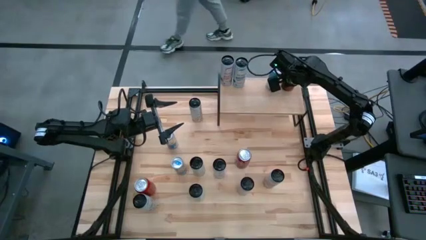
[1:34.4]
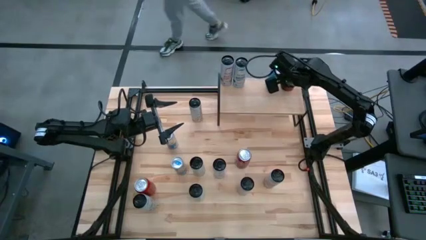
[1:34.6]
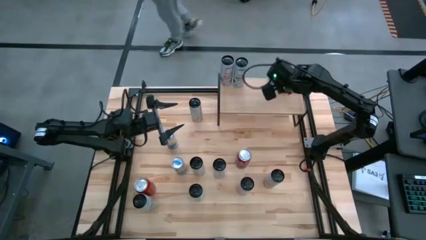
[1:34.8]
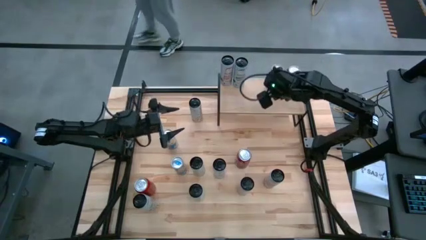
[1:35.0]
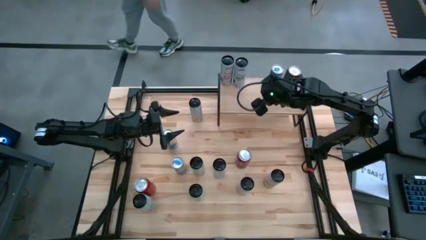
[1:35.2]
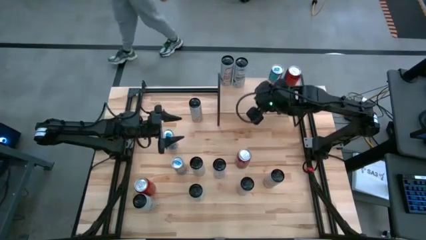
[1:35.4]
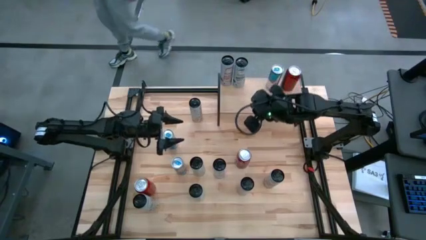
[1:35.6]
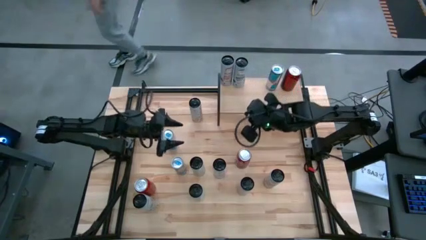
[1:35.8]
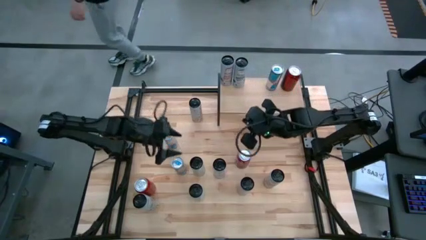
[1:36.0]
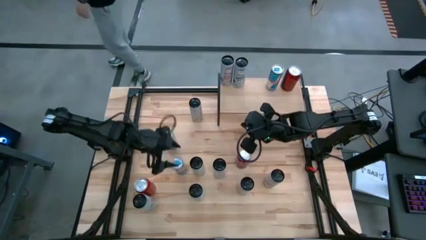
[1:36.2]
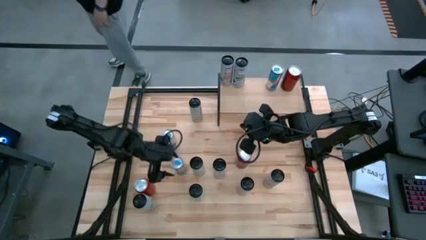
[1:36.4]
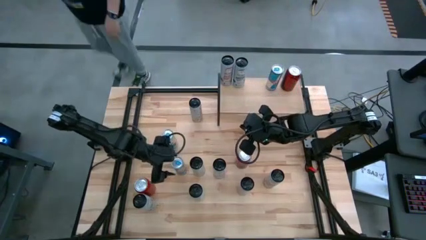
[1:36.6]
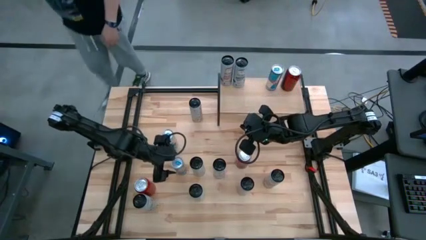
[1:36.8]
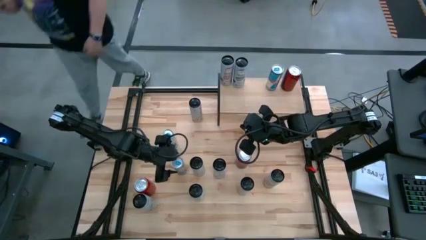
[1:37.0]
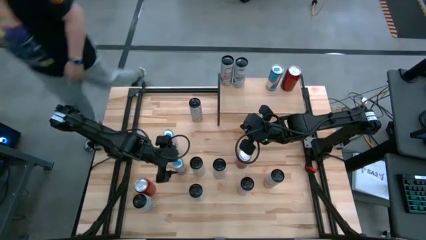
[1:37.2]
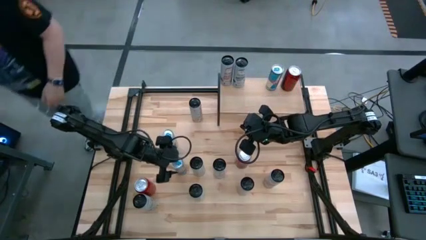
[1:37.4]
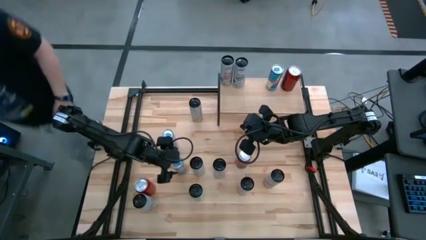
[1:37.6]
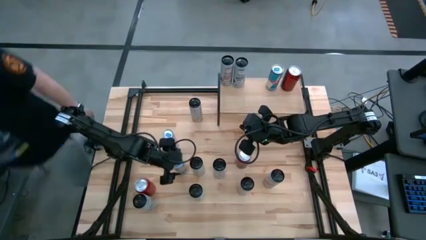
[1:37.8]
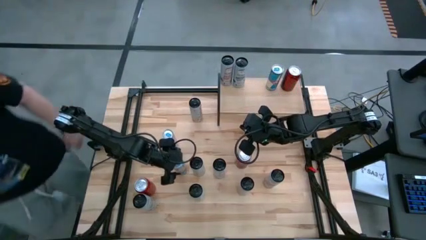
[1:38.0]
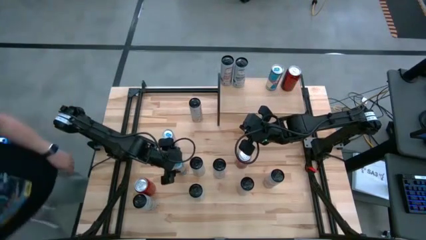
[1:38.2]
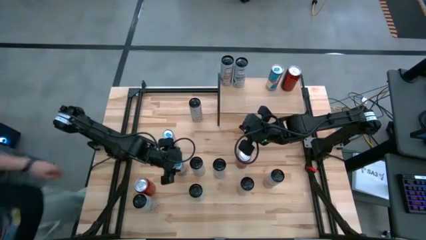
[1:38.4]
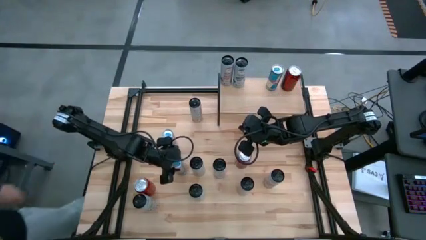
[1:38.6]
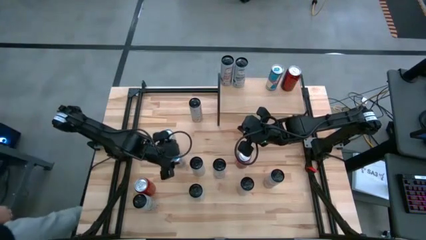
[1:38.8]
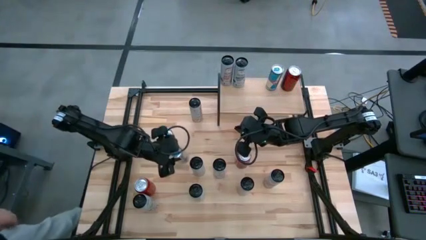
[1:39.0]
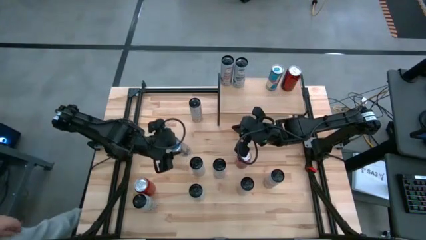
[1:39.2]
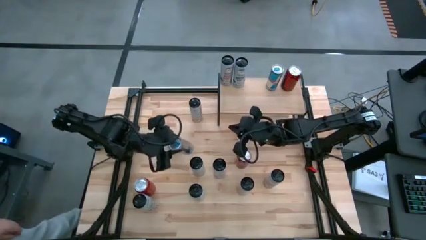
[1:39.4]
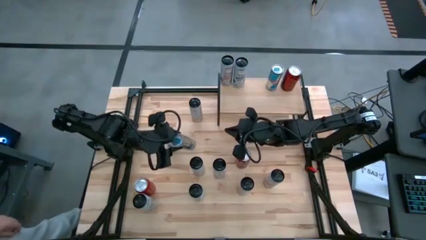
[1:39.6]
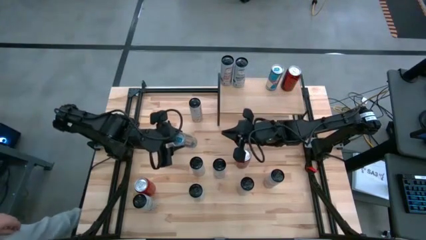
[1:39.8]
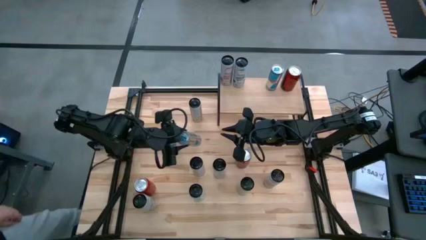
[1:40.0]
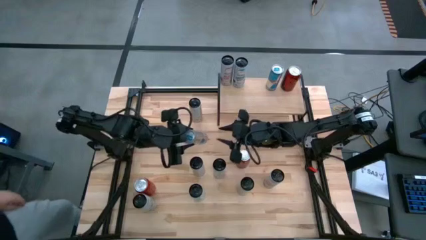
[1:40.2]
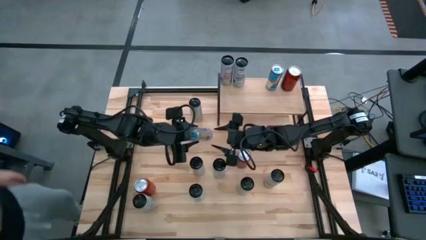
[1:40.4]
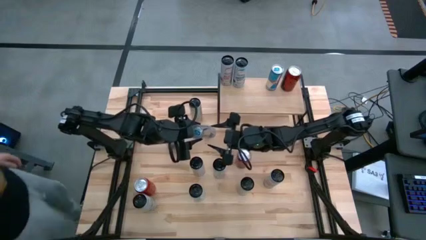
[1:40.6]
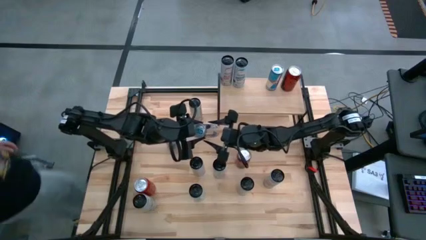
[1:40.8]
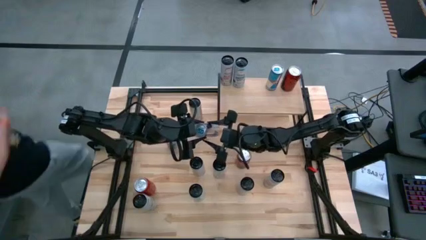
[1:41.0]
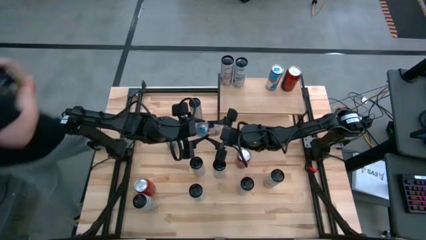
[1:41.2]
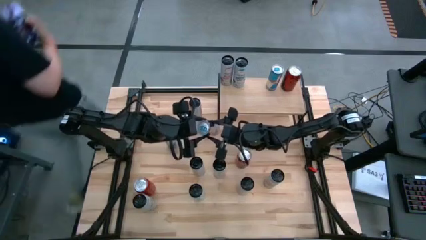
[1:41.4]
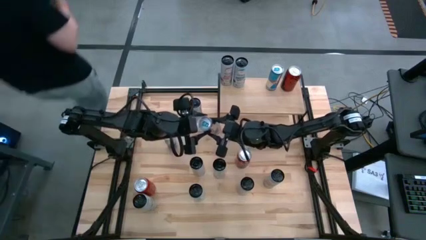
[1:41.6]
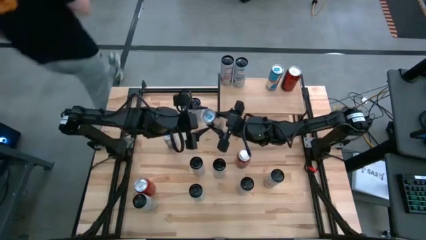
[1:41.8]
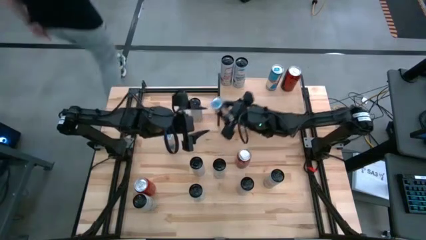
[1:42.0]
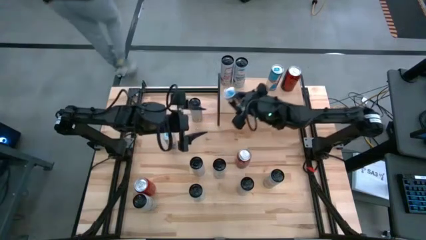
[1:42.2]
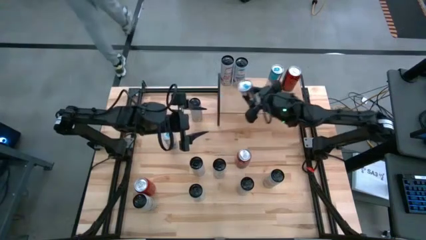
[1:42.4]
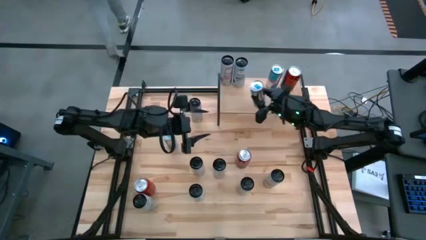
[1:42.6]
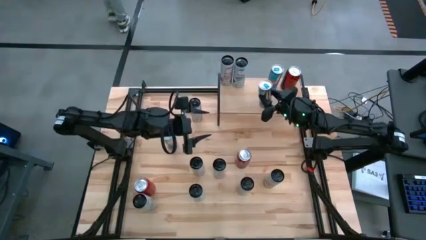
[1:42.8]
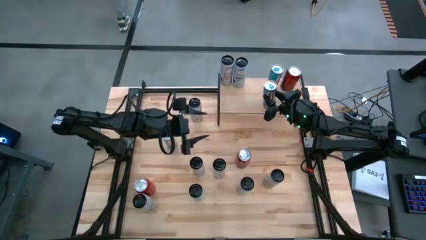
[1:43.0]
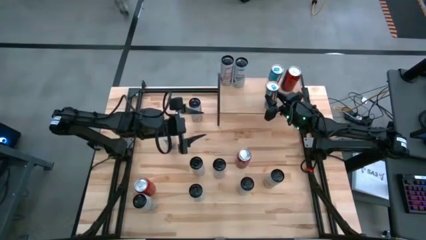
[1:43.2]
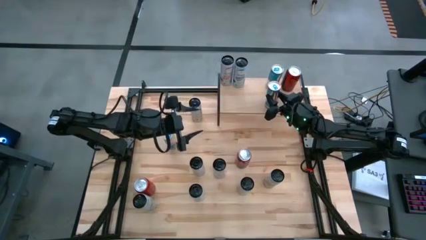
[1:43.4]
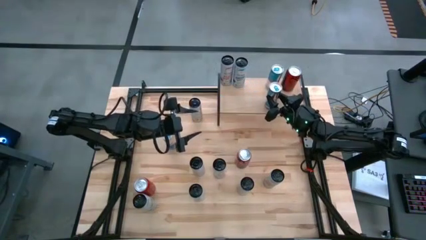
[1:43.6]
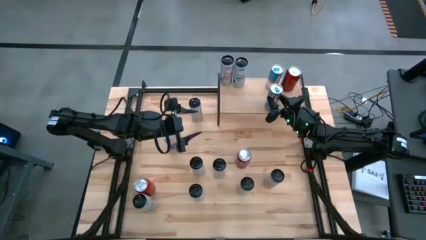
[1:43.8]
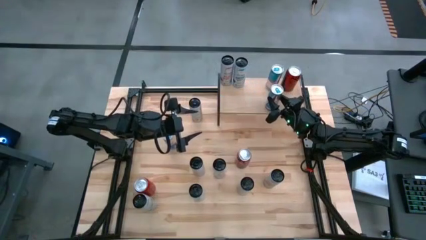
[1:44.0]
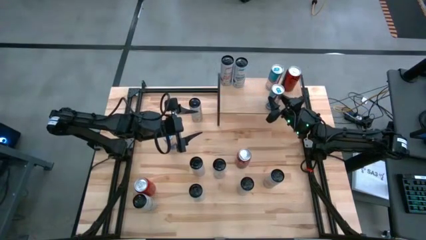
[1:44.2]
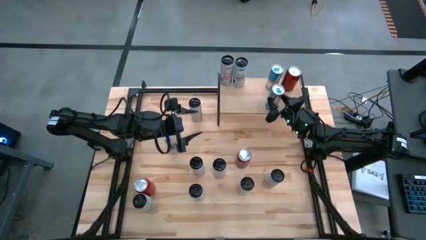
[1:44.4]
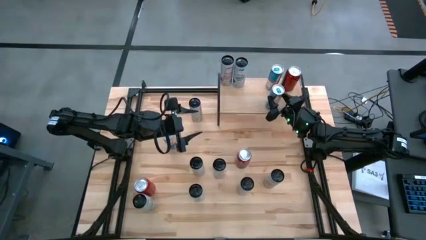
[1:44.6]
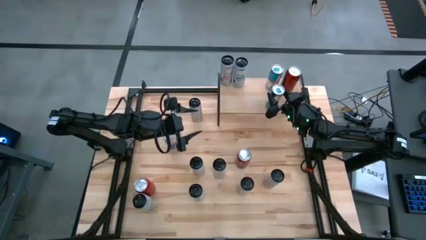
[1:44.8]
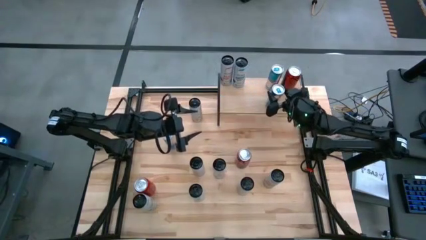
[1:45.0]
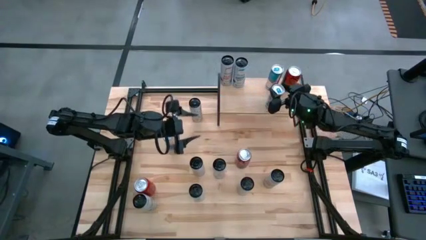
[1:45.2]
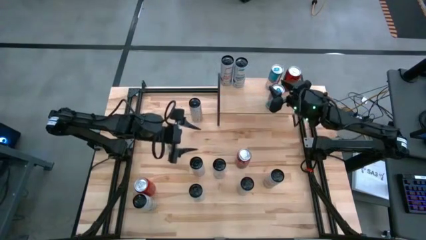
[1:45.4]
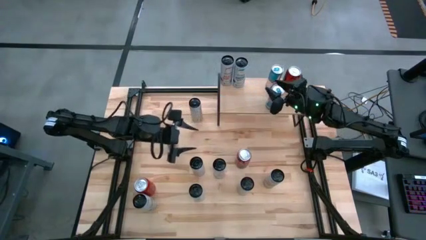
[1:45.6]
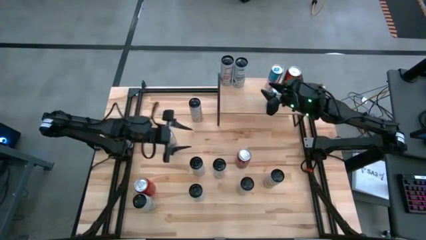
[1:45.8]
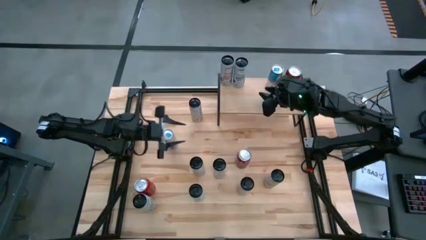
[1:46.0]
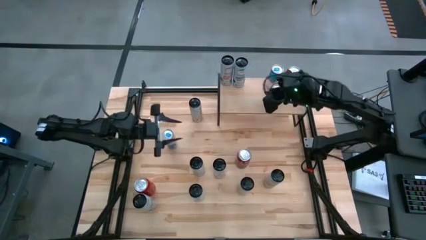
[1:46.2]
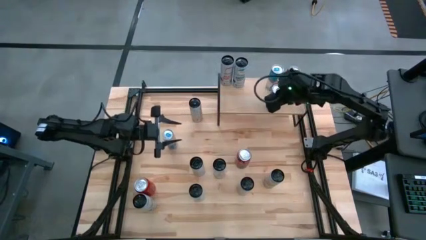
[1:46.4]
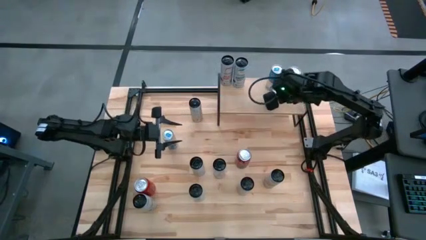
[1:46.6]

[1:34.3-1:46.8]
Task: Place canned beverage on shelf
Put the bottom blue soda can on the shelf aligned with the blue soda can
